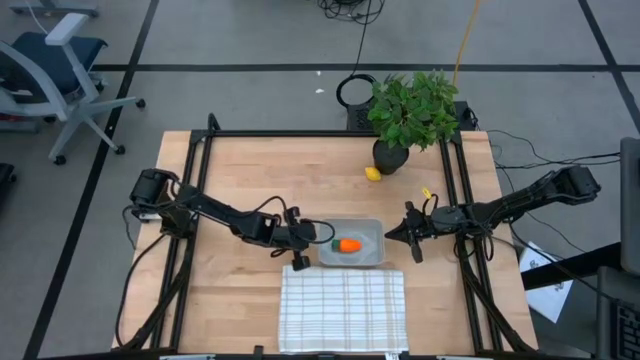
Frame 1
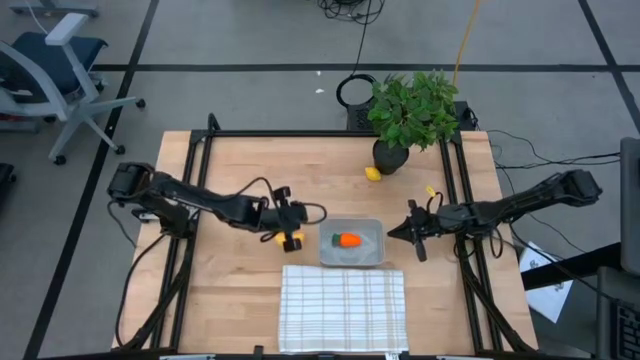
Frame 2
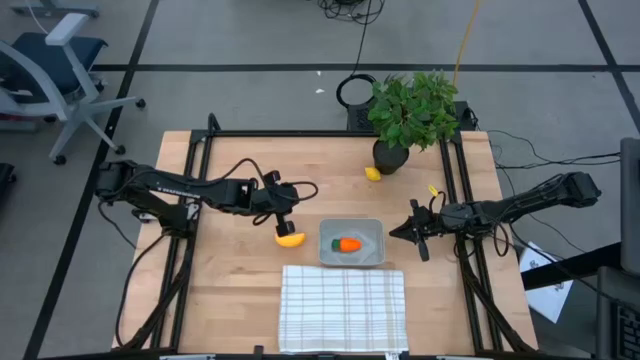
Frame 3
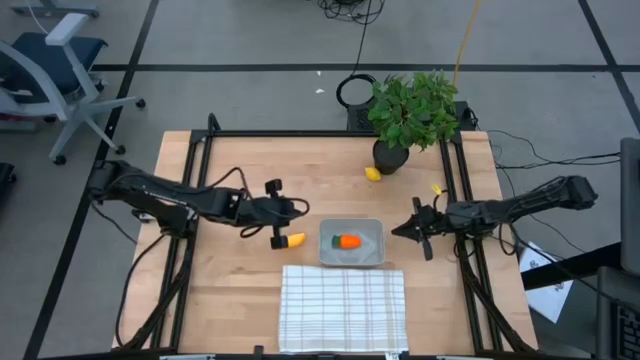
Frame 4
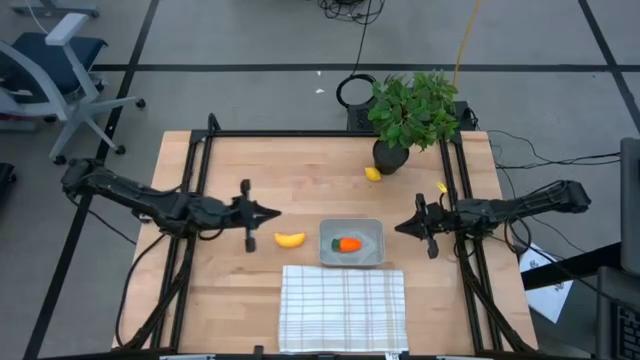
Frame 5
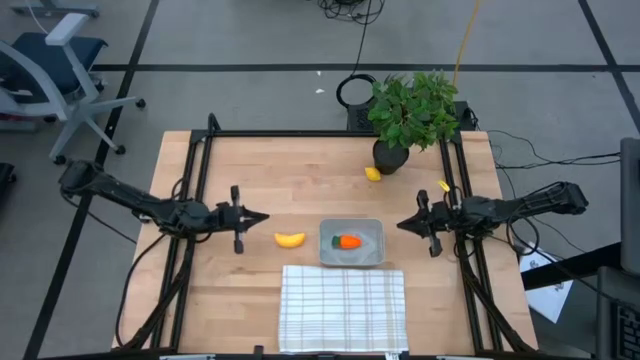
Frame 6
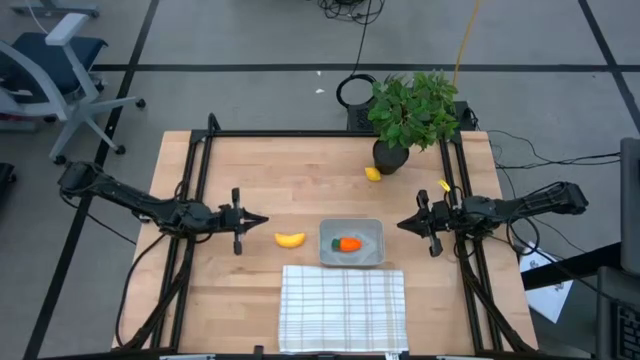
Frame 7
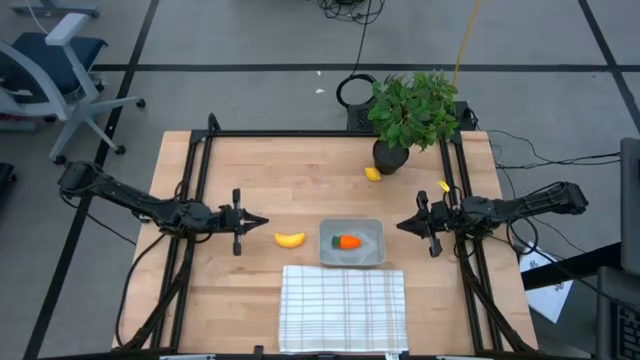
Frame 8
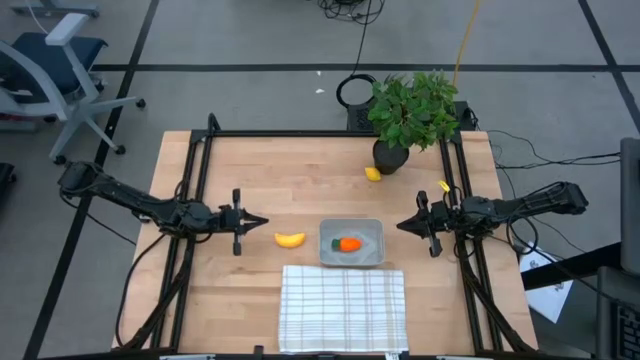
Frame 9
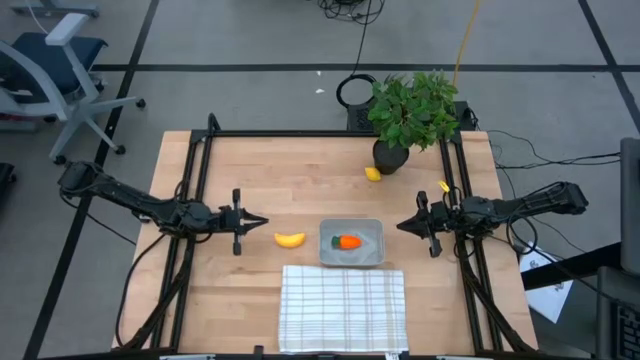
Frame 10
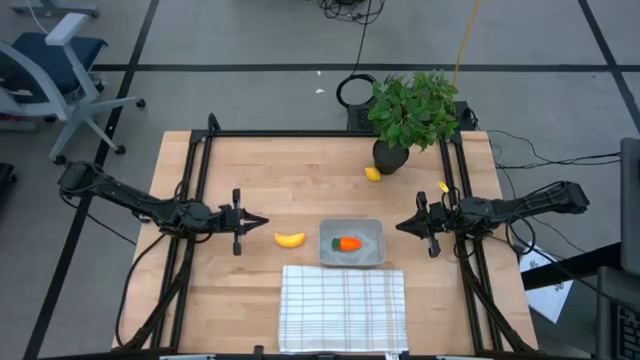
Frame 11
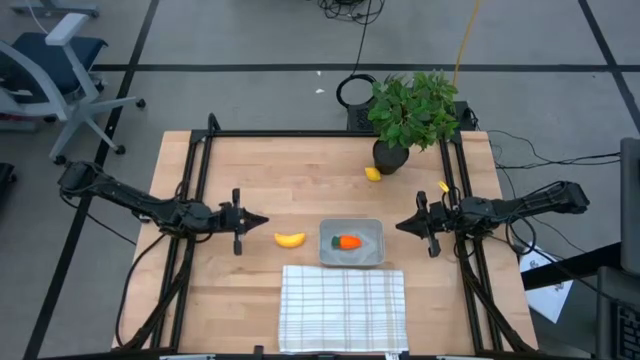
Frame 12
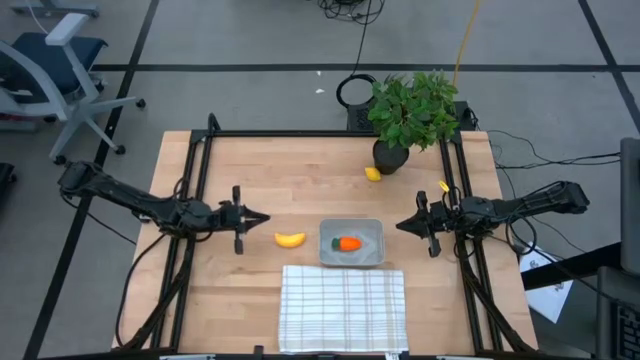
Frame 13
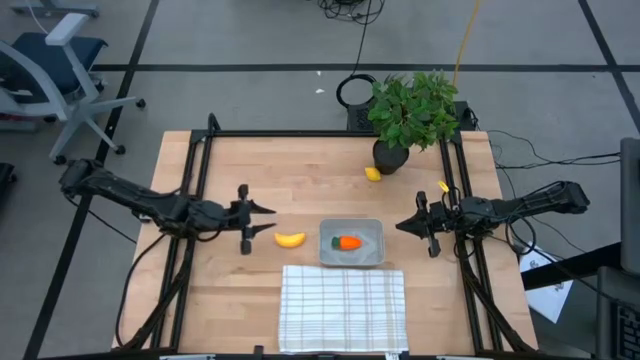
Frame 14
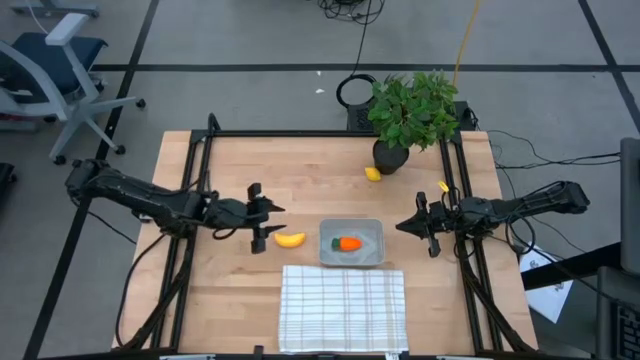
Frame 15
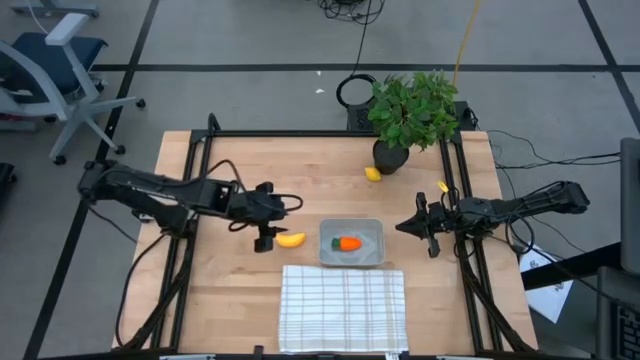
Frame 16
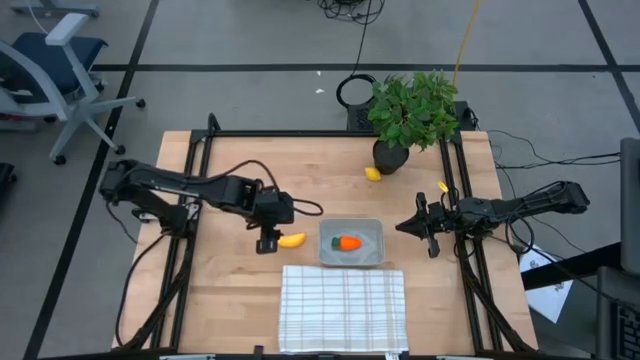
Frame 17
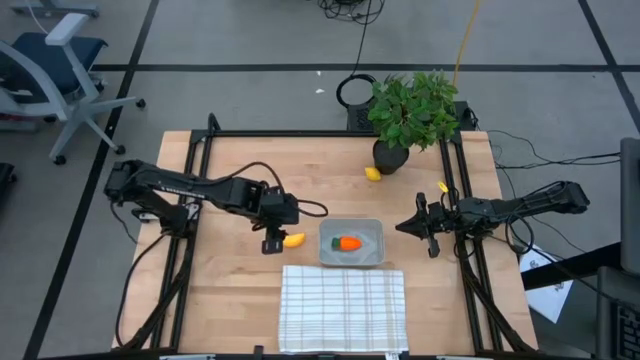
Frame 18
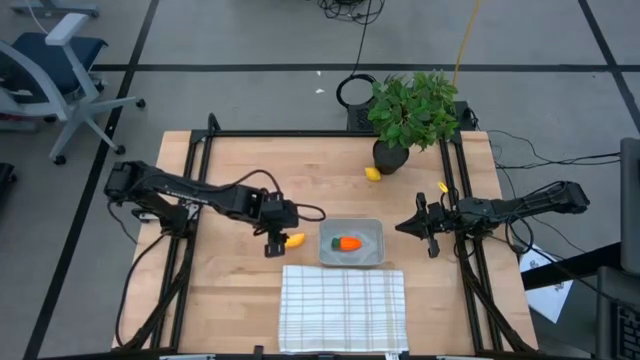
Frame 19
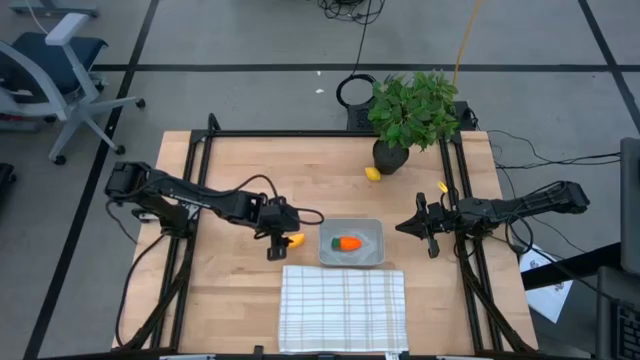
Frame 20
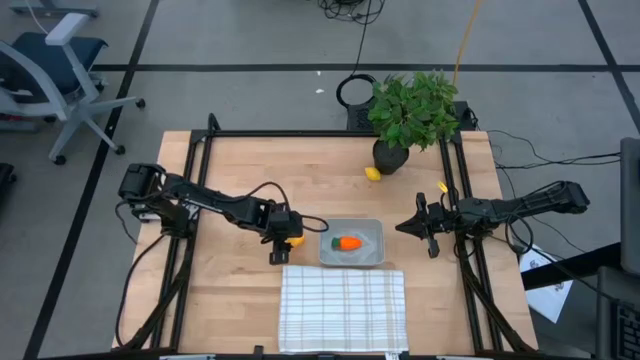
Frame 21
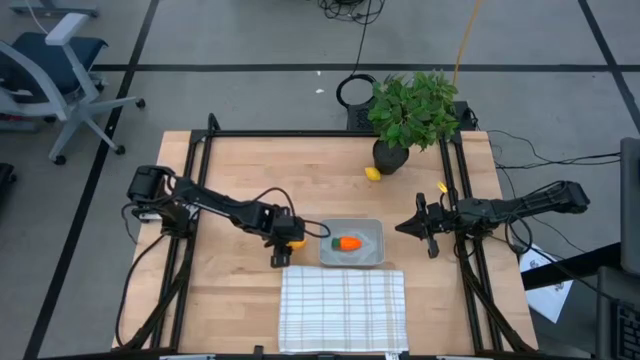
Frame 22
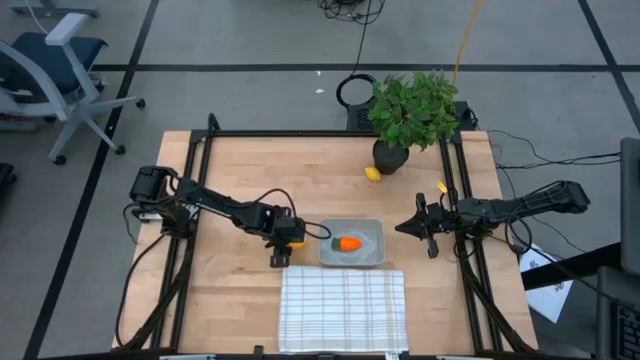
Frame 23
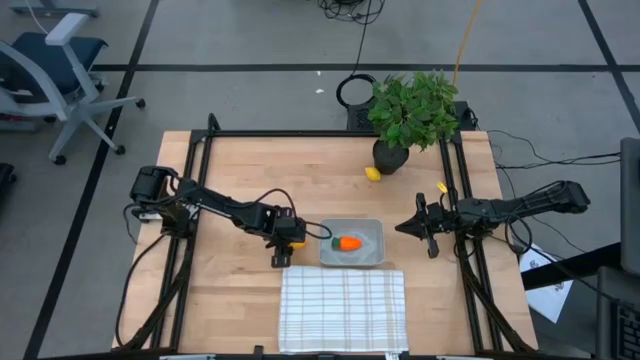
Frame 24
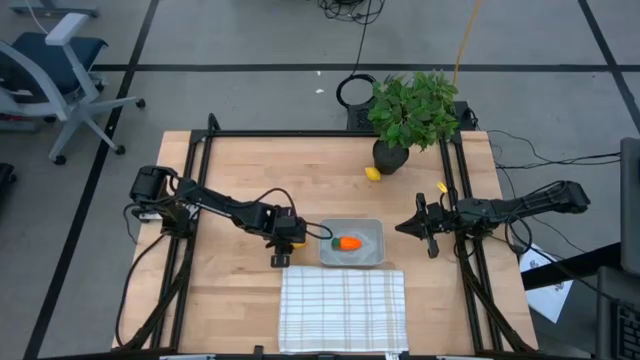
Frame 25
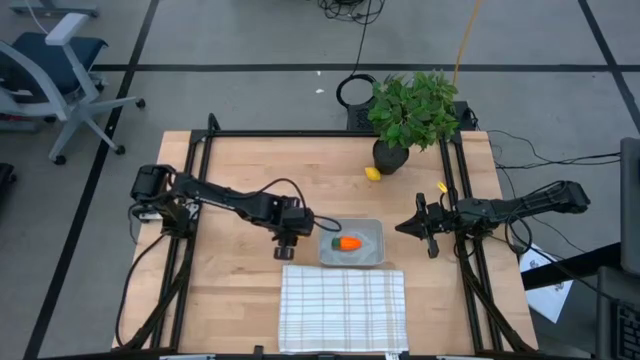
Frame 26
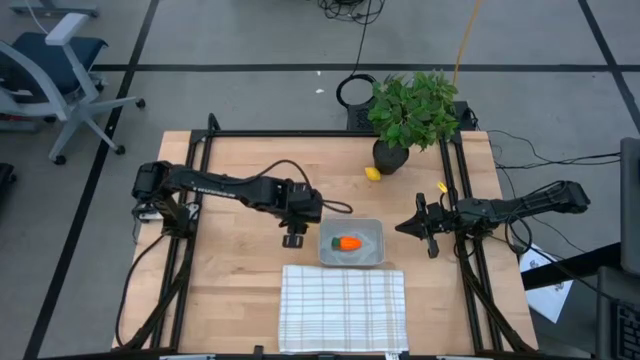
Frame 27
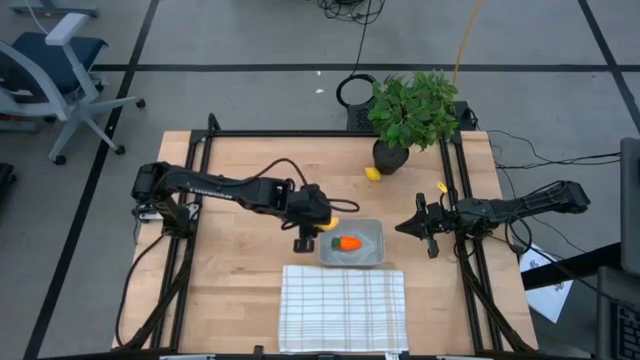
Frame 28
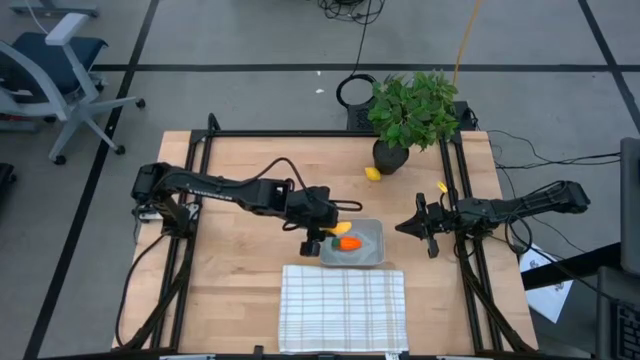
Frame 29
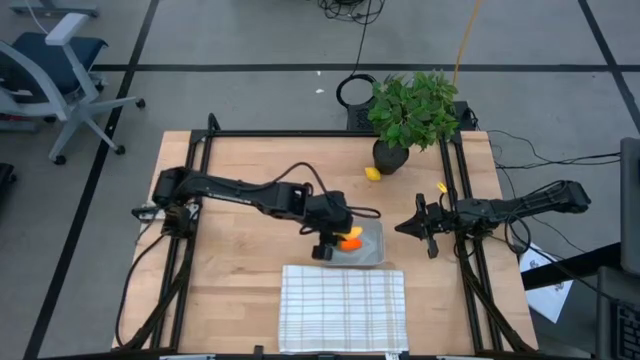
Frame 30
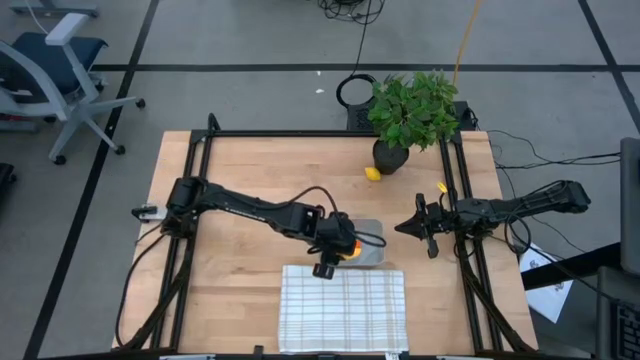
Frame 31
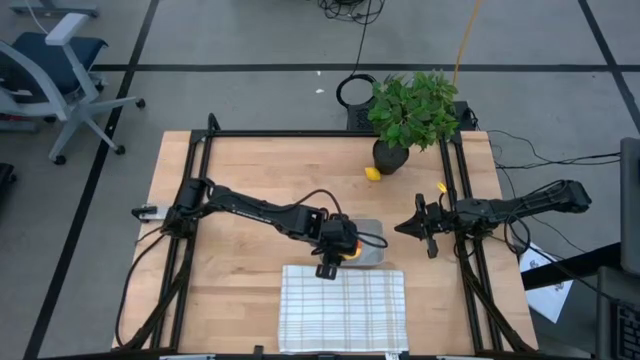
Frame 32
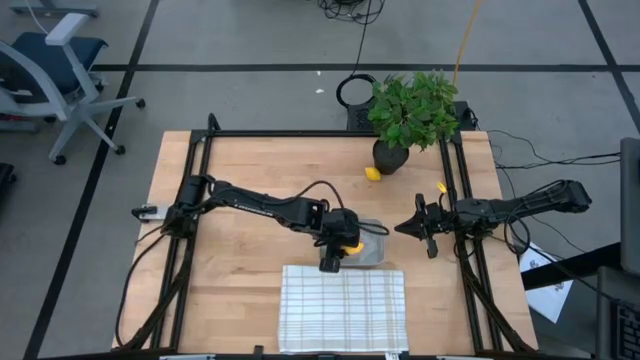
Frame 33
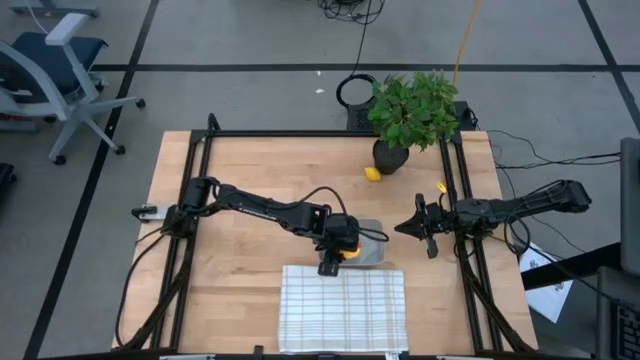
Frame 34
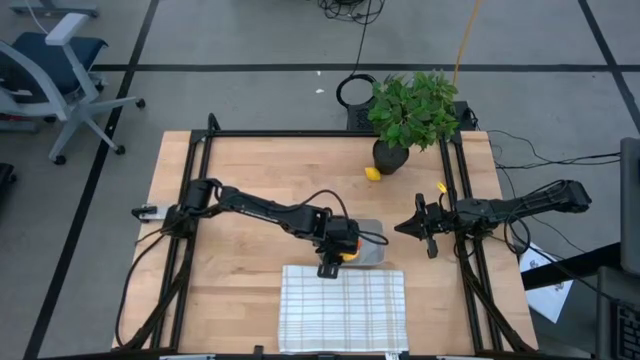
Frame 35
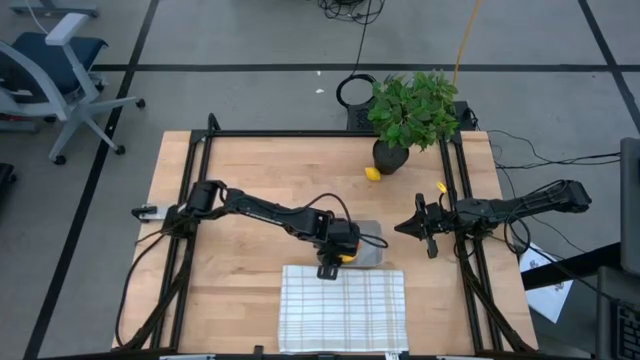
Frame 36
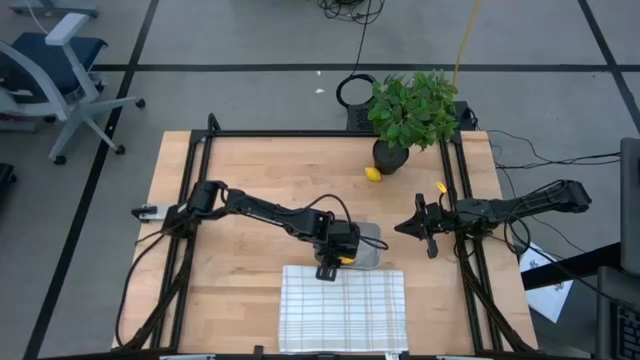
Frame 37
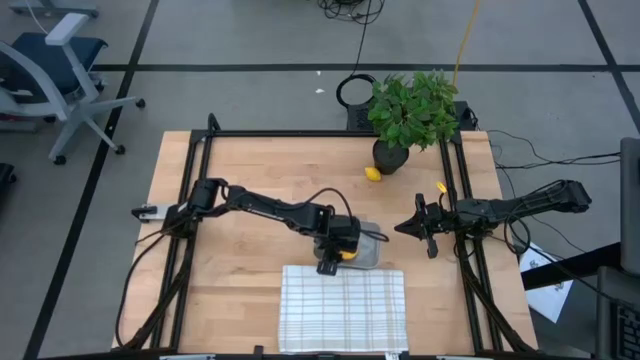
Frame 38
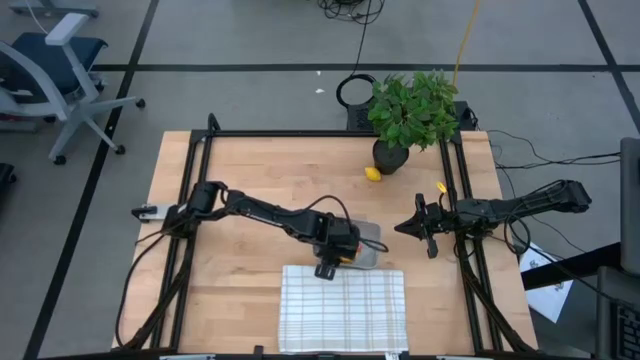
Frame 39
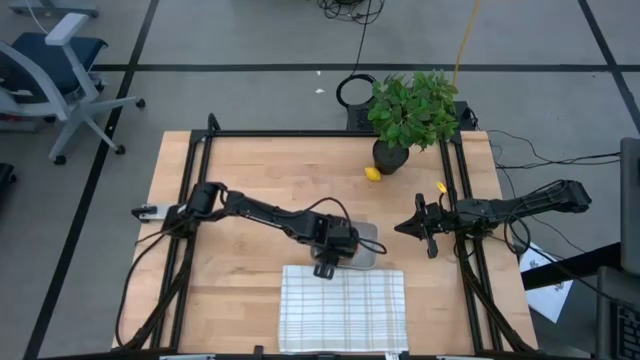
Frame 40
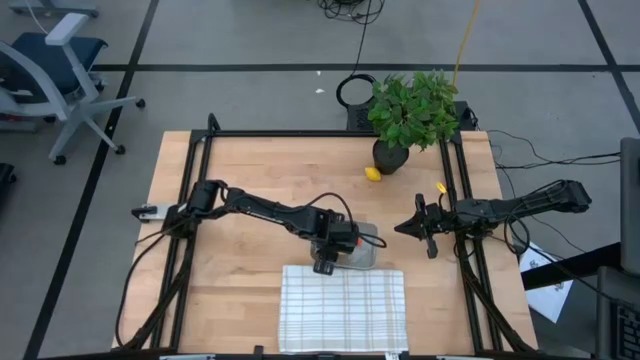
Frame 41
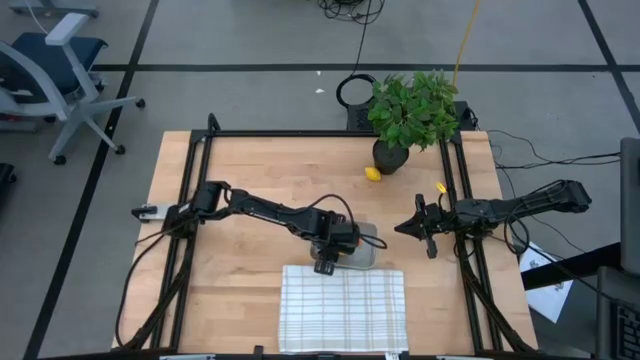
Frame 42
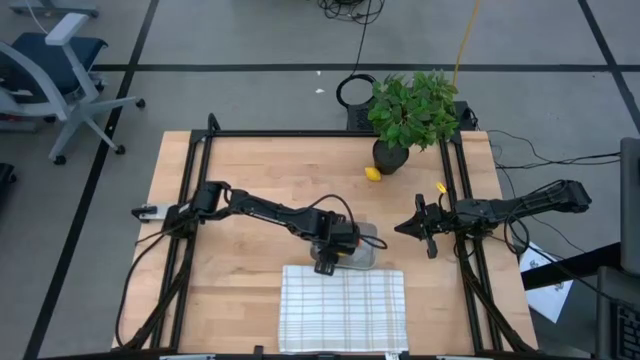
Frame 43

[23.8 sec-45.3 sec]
Task: Pick and placing Produce into tupperware
Put the yellow banana into the gray bin
